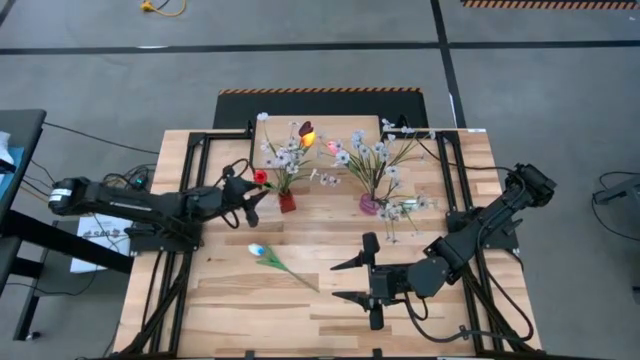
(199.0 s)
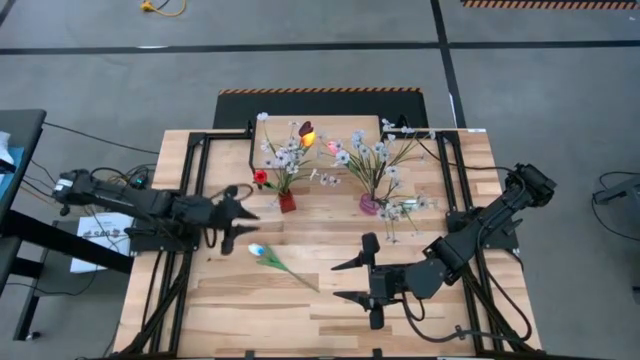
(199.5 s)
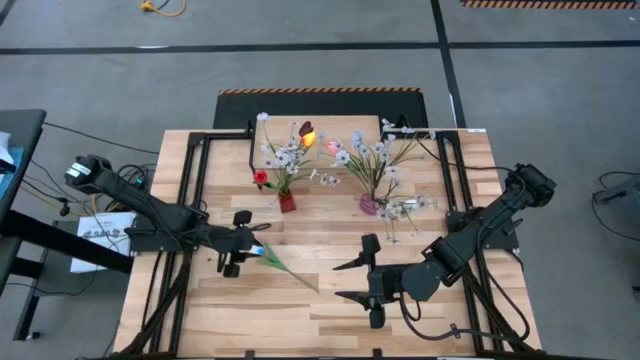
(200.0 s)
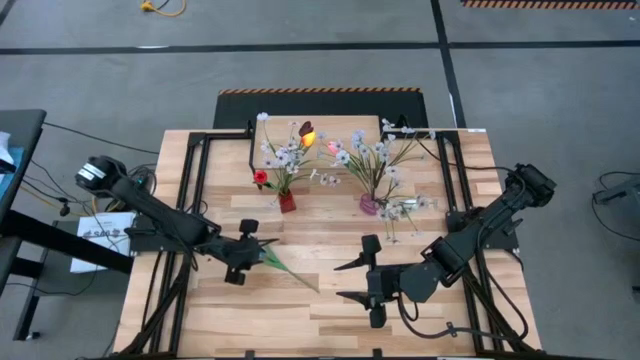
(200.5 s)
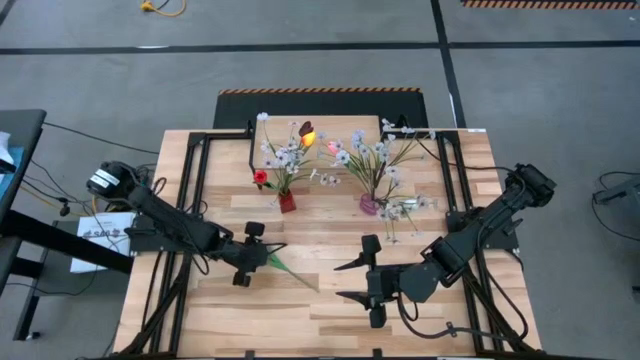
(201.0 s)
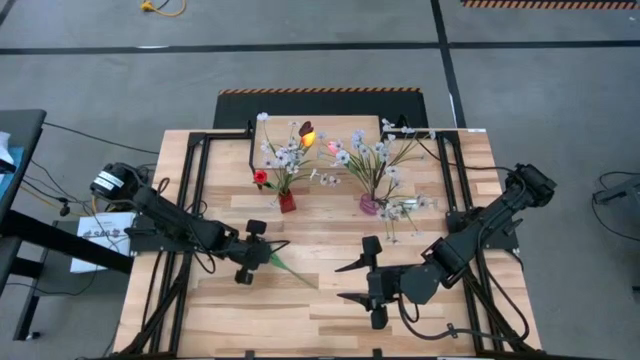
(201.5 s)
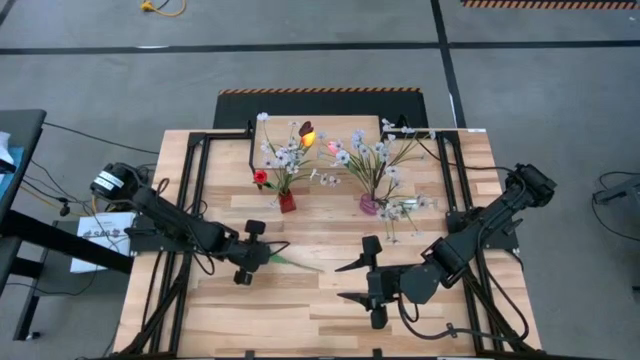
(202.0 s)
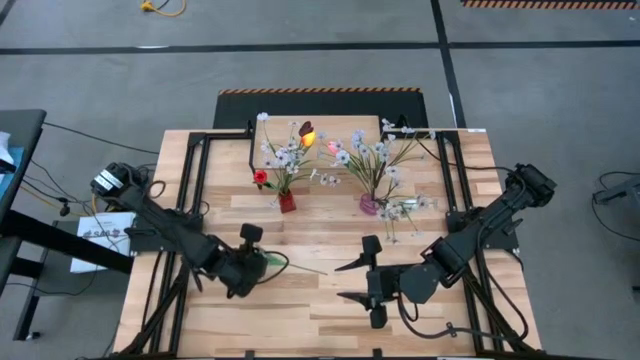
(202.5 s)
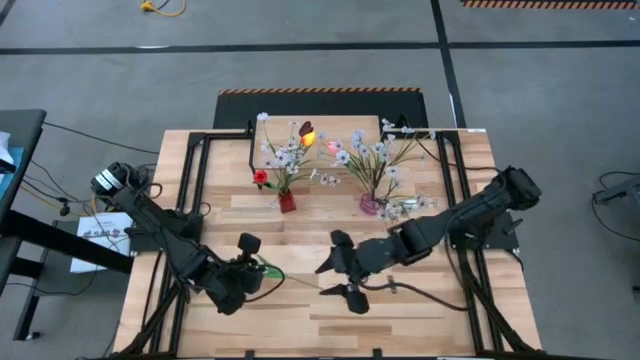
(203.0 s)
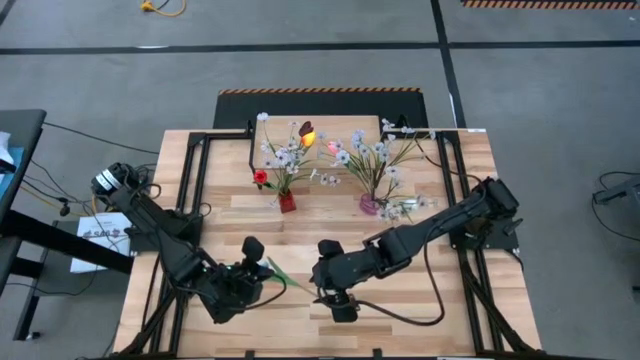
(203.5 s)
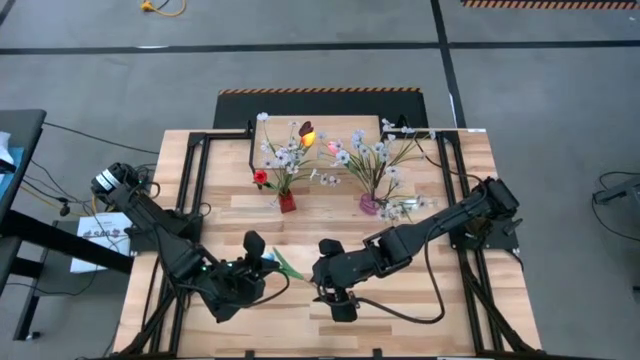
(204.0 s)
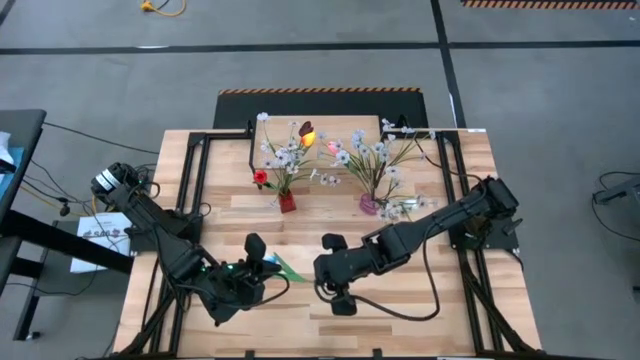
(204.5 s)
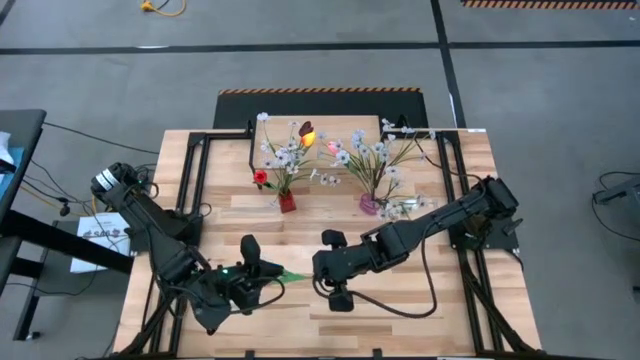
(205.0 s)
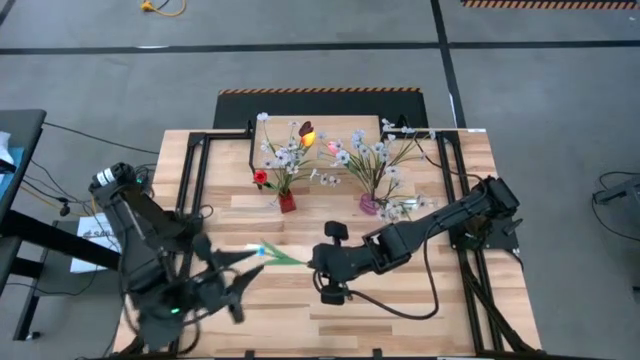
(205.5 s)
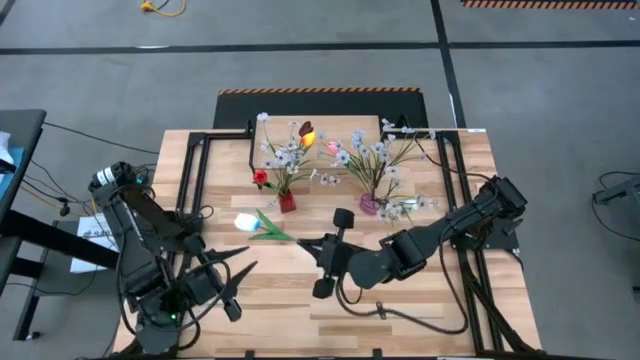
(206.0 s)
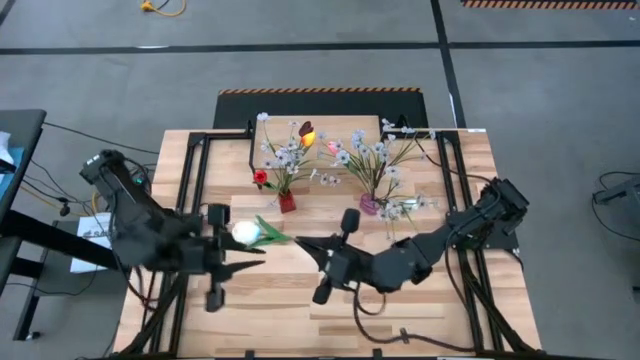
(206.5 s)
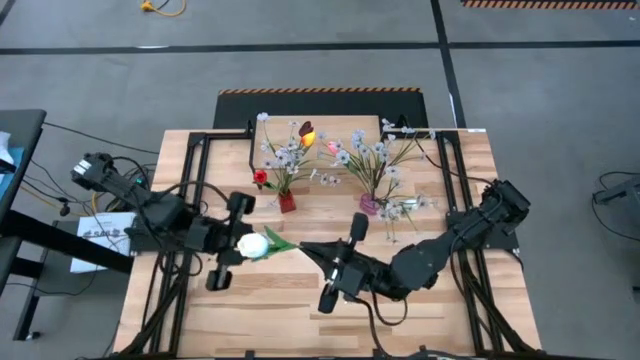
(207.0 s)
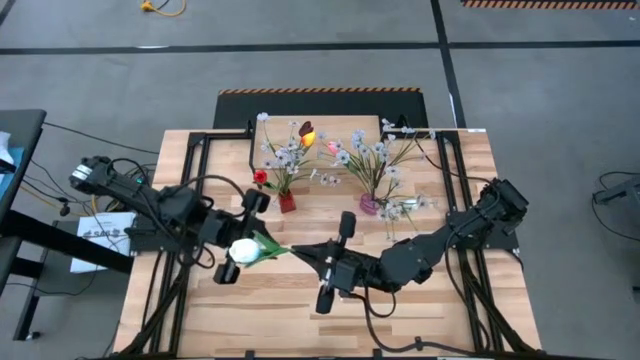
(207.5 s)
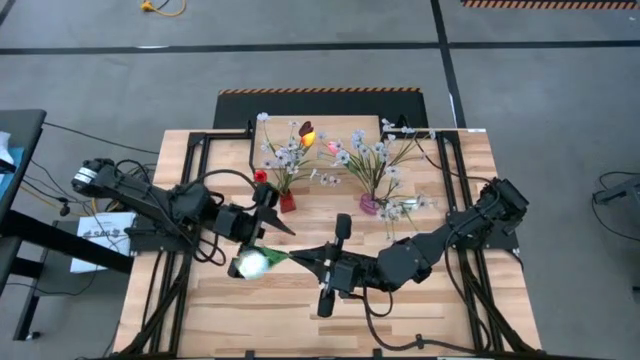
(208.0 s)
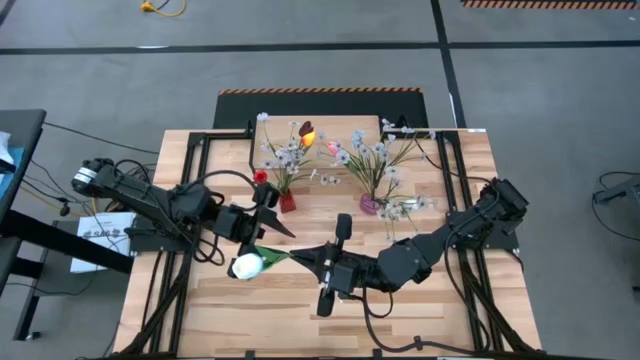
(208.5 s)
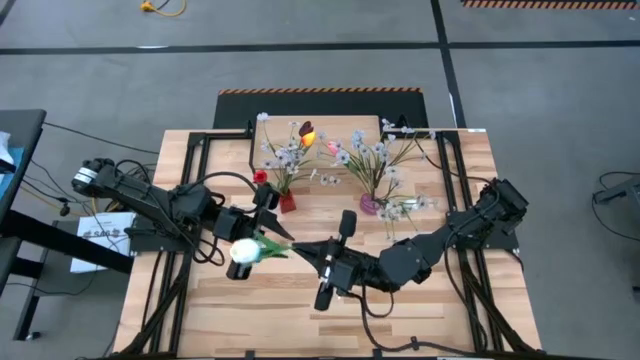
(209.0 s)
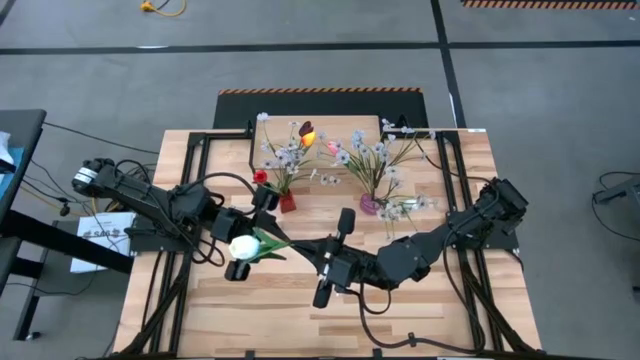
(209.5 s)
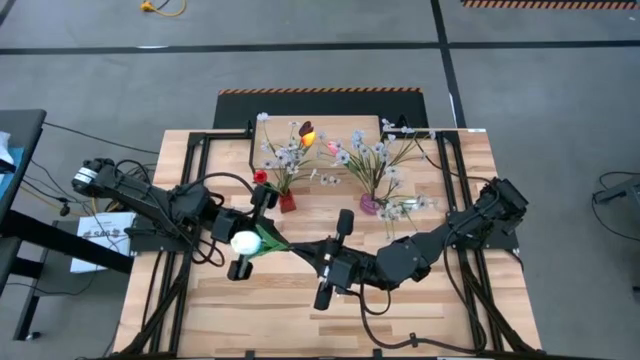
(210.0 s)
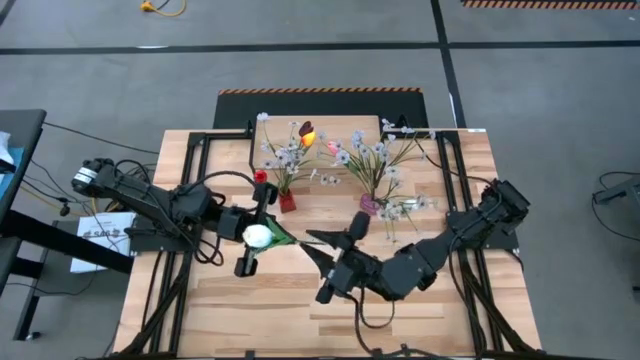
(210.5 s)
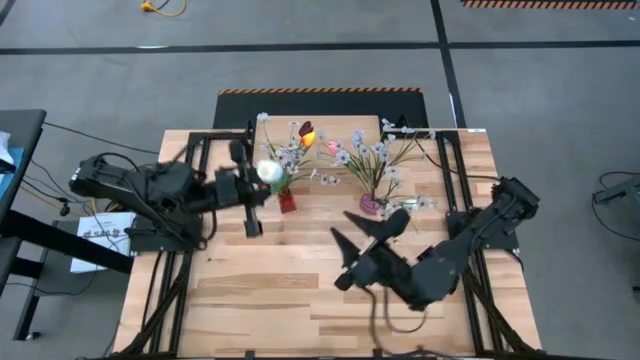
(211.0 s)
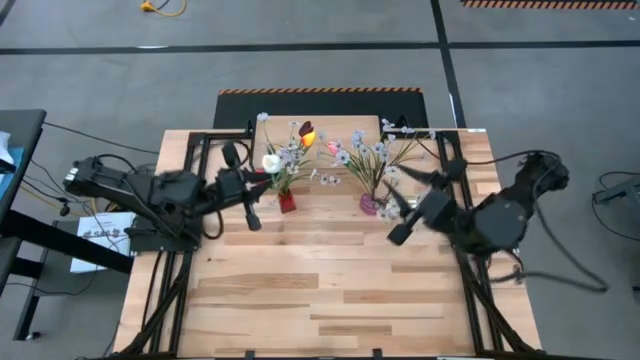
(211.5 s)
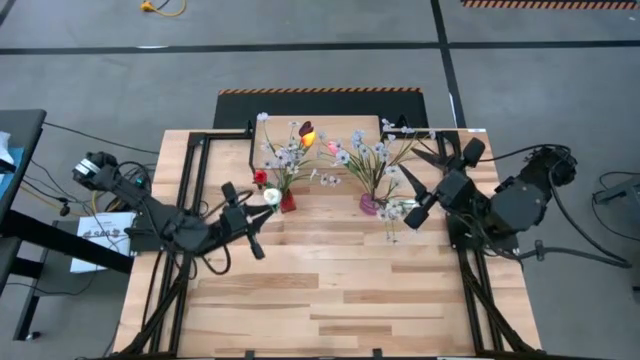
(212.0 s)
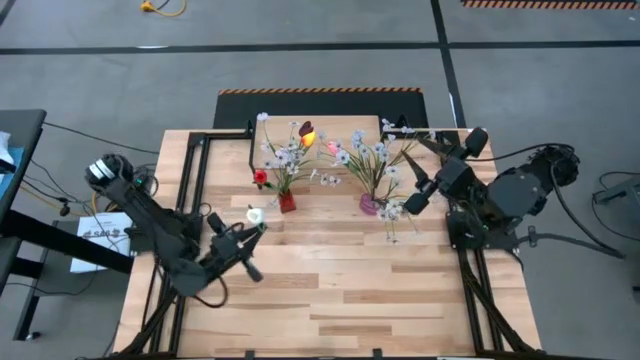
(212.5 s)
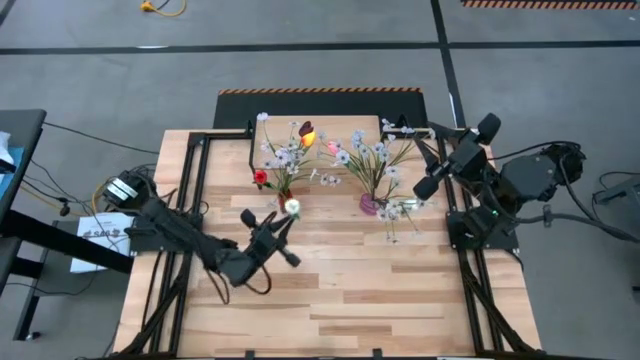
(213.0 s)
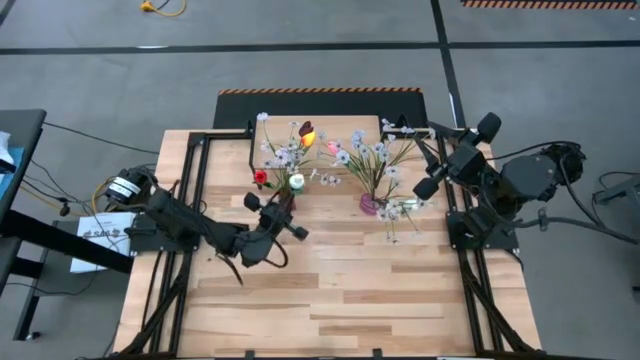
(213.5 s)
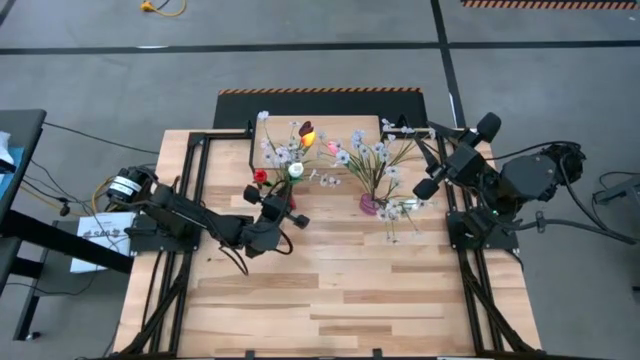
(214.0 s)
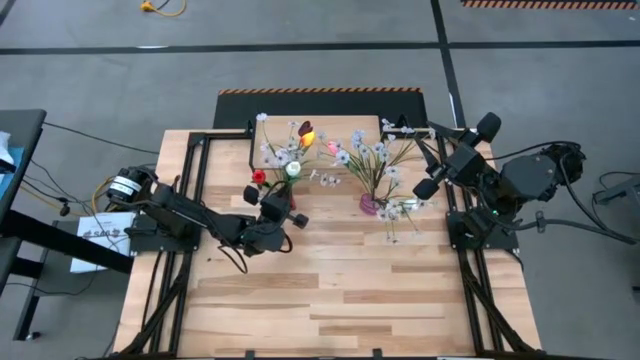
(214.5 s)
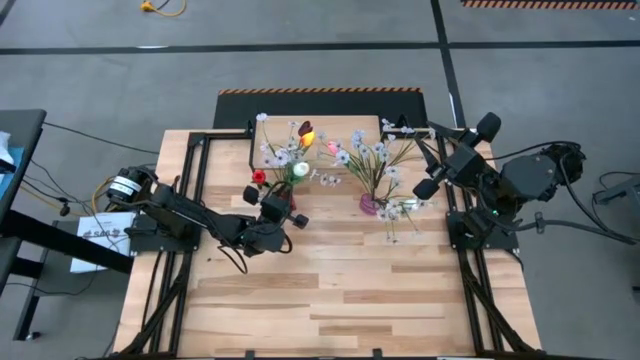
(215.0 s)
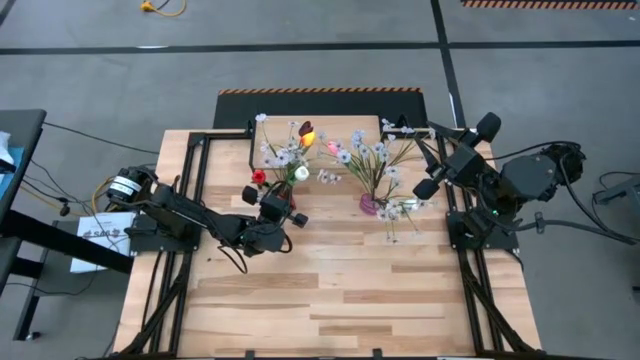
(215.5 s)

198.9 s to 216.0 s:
Task: Pick and place flowers into a vace then onto a shelf
Put the white tulip into the red vase

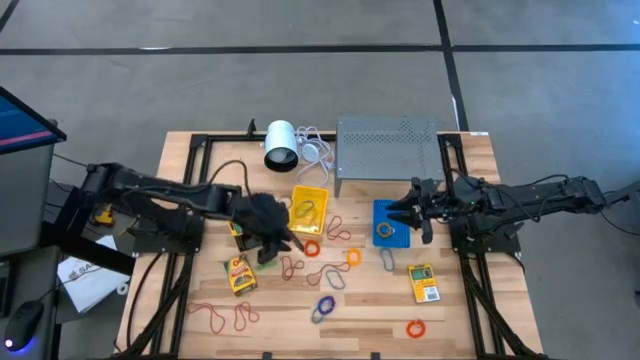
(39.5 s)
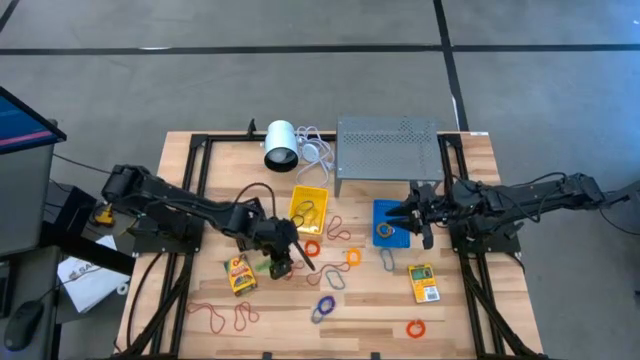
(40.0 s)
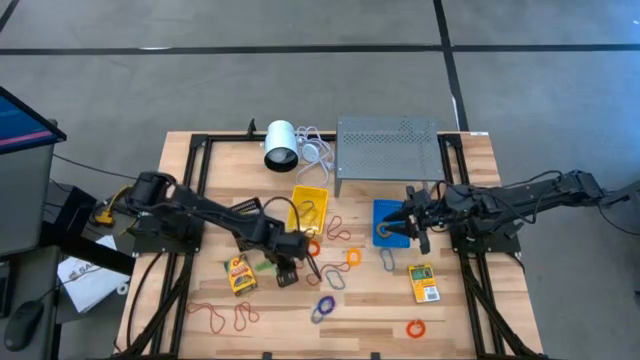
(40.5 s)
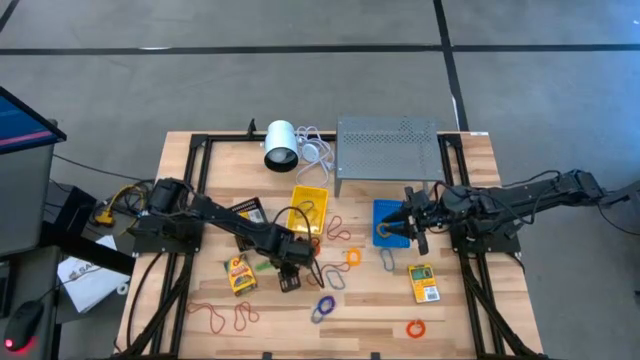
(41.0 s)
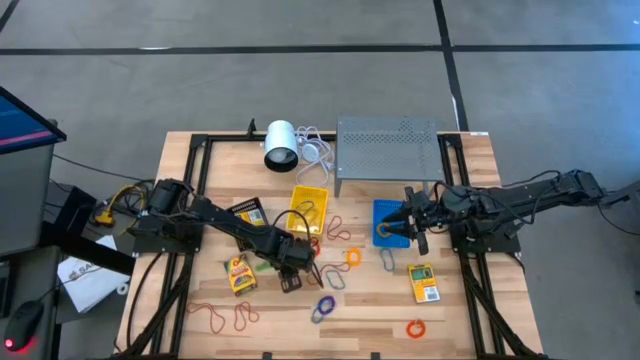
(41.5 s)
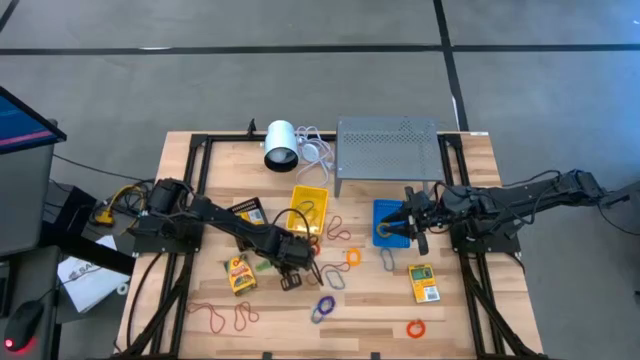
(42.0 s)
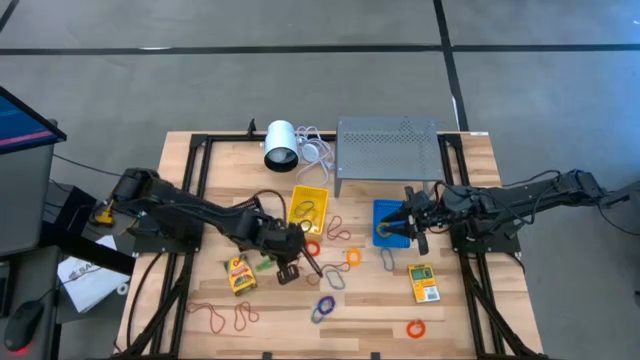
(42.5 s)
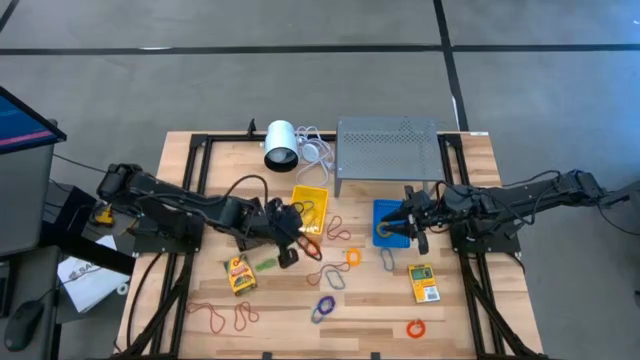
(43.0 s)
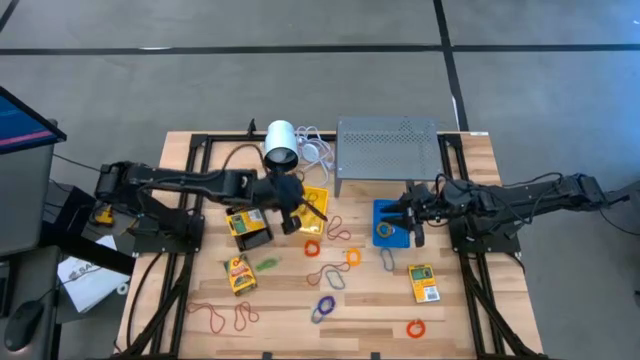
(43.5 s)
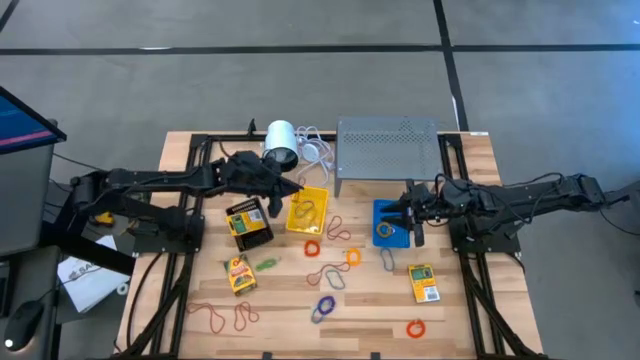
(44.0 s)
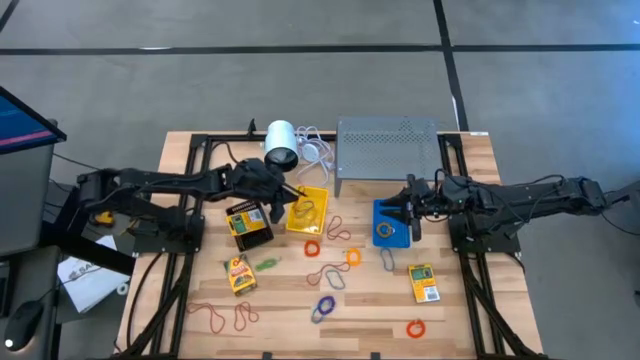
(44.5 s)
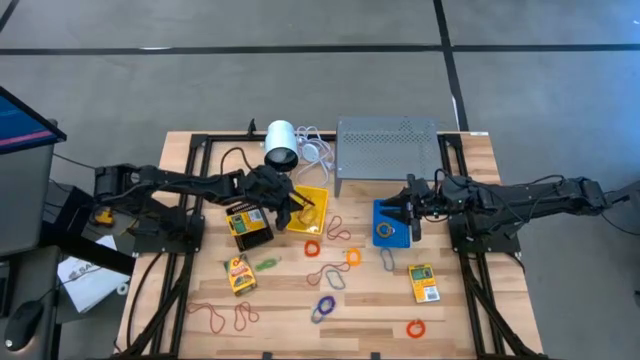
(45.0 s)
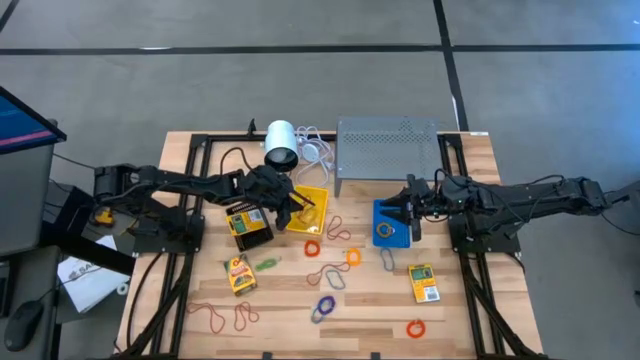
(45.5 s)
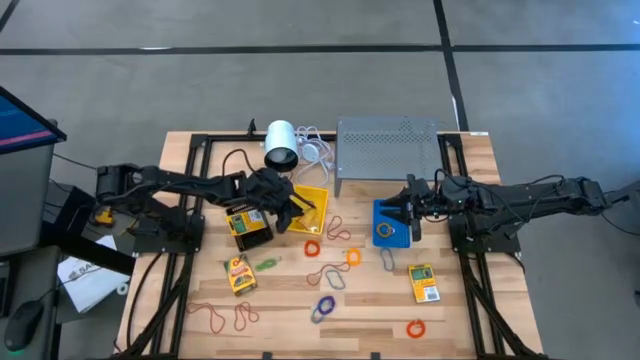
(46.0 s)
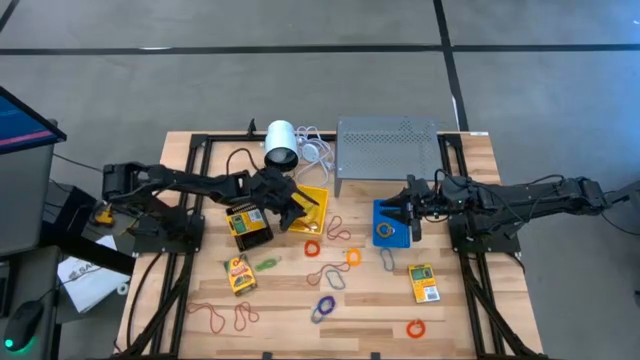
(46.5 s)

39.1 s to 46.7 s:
Task: Pick & Place Office Desk Supplies
Put the top left red rubber band into the yellow basket
